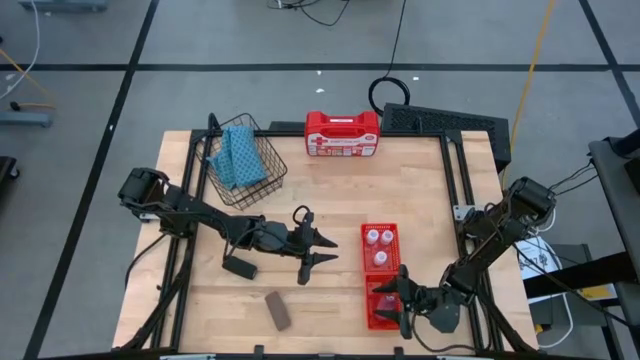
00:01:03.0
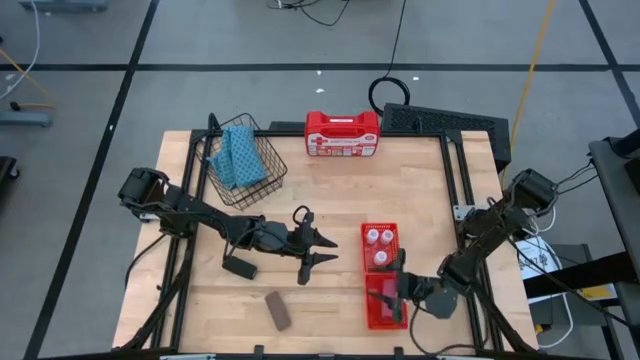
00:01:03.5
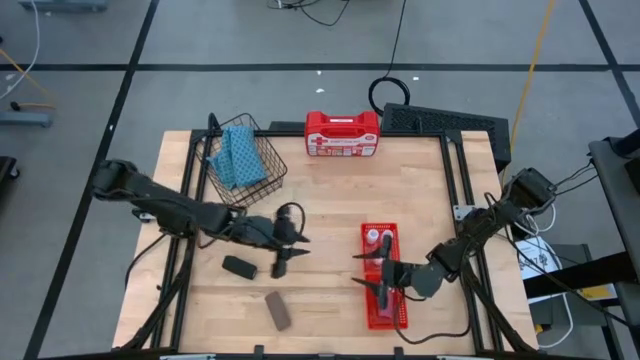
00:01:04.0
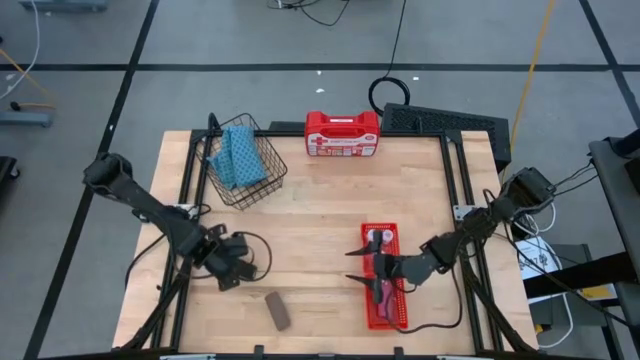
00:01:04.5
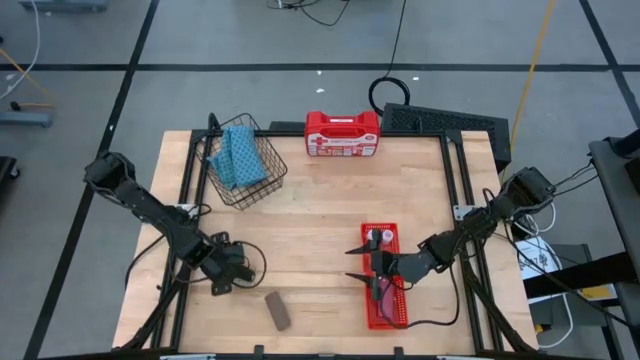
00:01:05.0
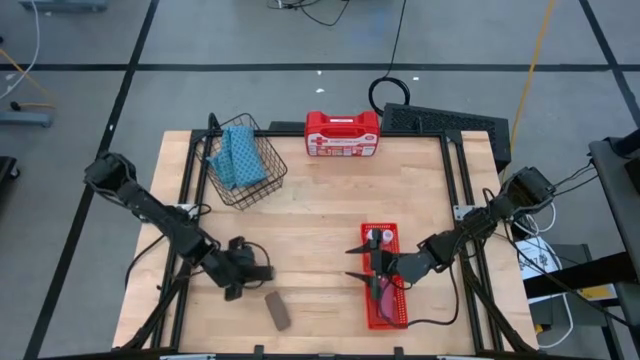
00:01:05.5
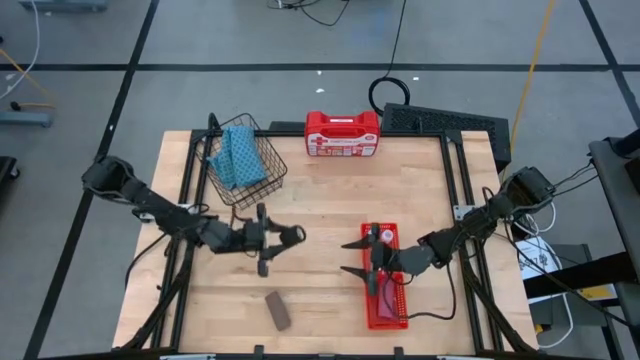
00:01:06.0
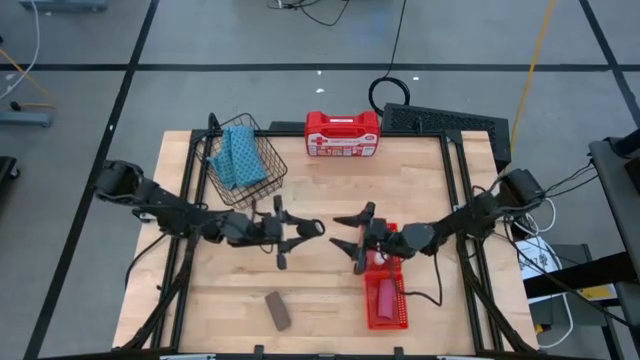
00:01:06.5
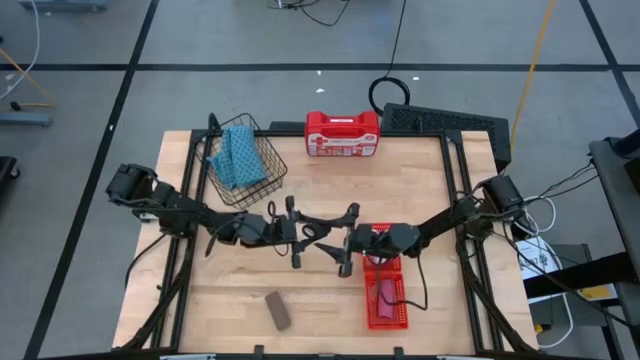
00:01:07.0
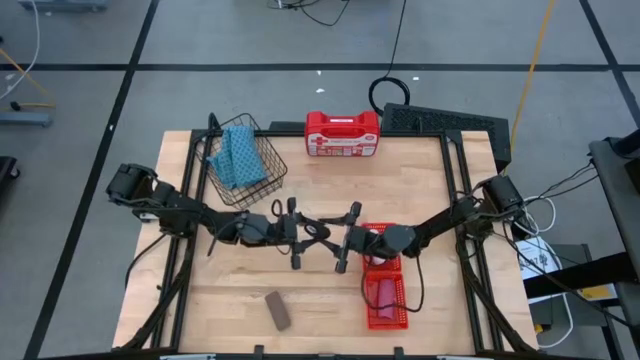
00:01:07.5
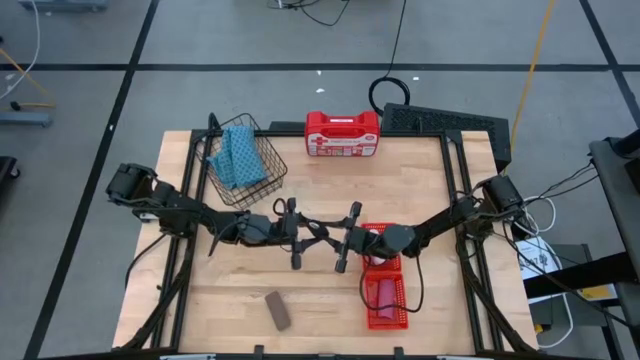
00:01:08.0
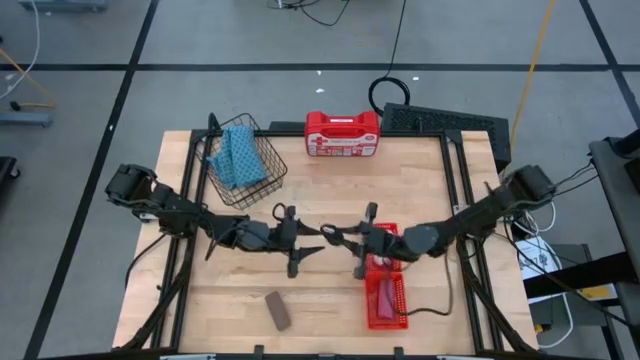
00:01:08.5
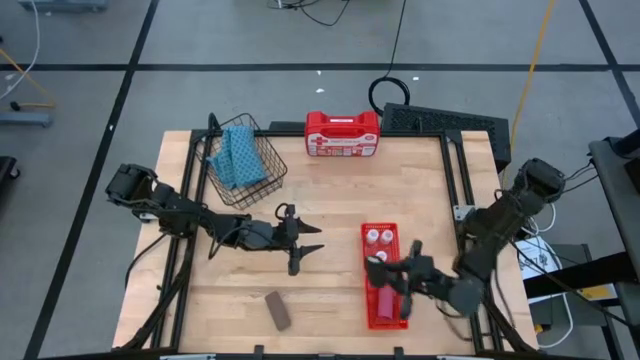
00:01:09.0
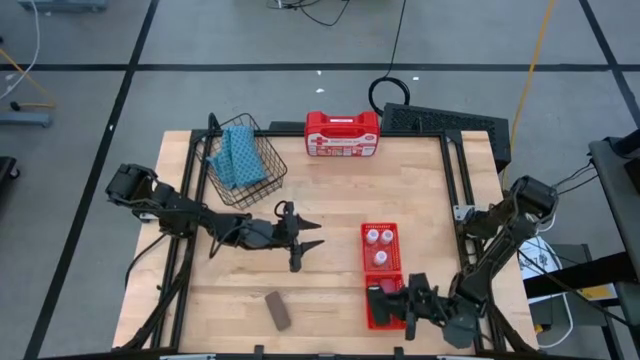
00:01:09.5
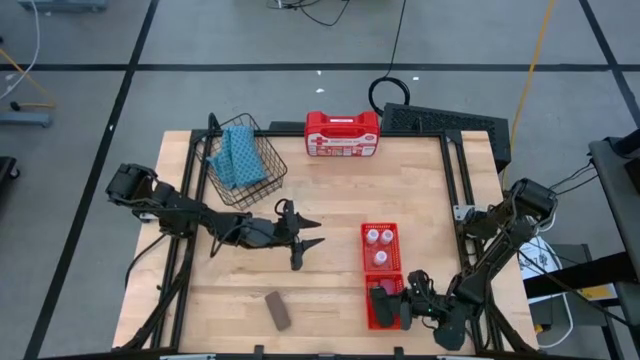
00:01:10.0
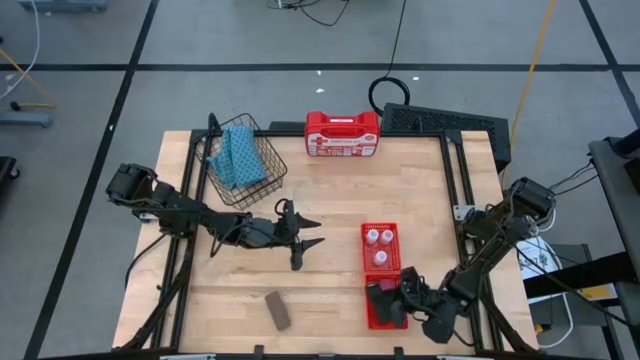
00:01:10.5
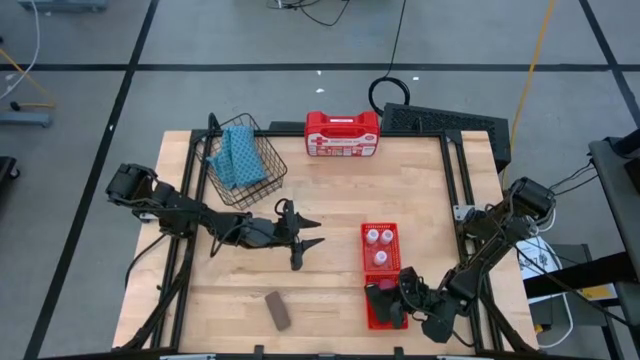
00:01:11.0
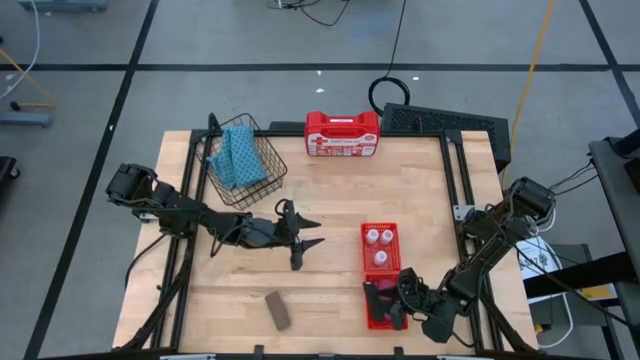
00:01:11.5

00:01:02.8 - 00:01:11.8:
Task: Pick & Place Medicine items
Put the black bandage into the bottom red basket

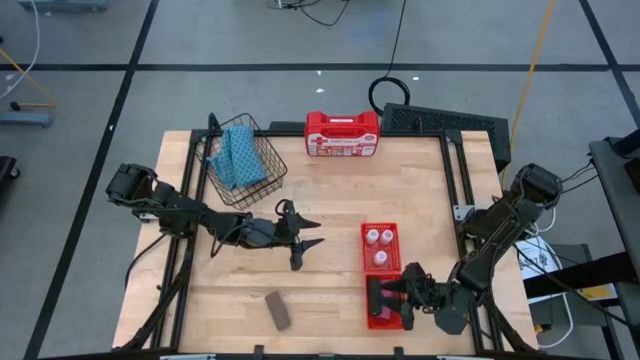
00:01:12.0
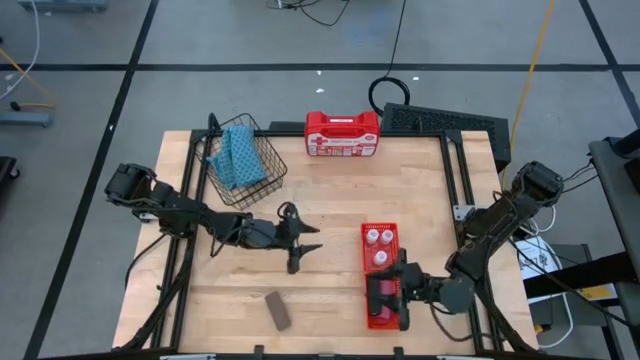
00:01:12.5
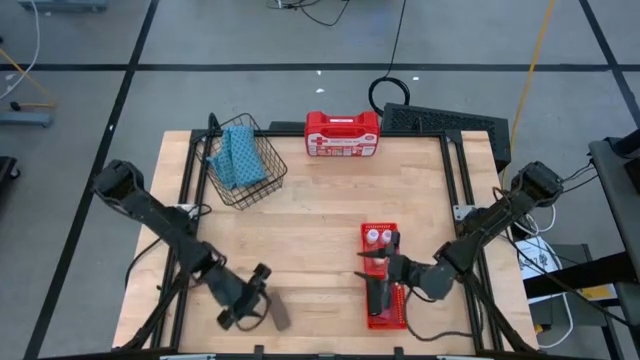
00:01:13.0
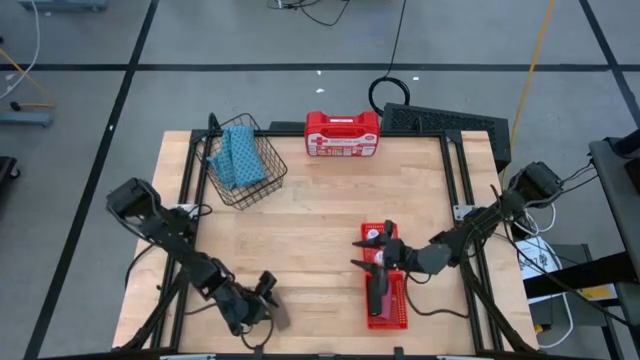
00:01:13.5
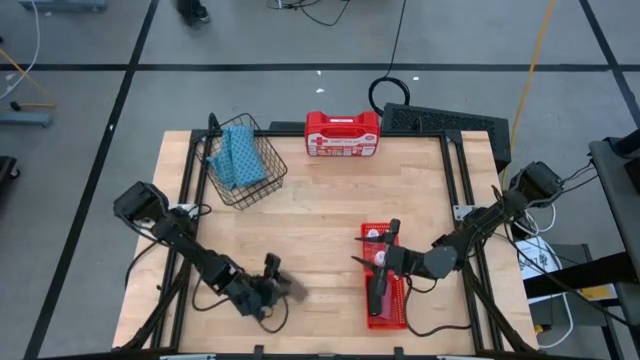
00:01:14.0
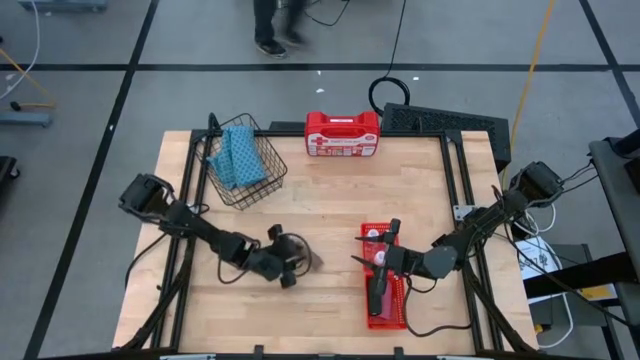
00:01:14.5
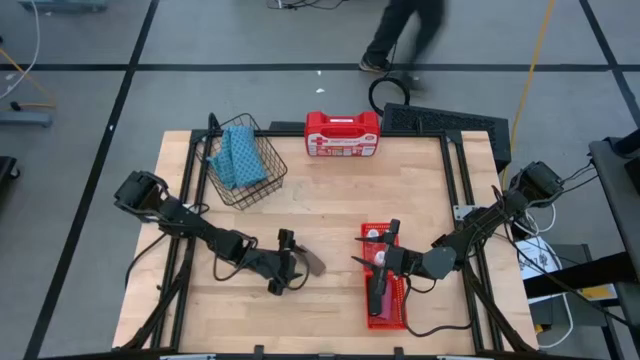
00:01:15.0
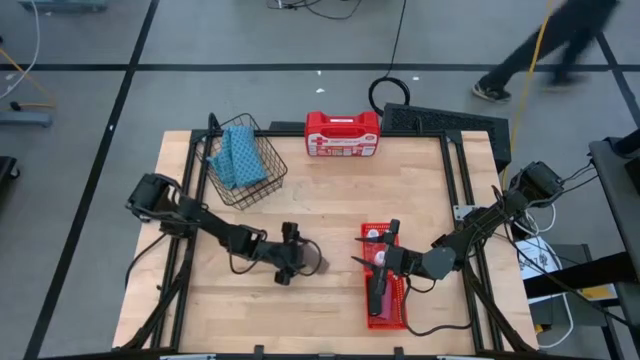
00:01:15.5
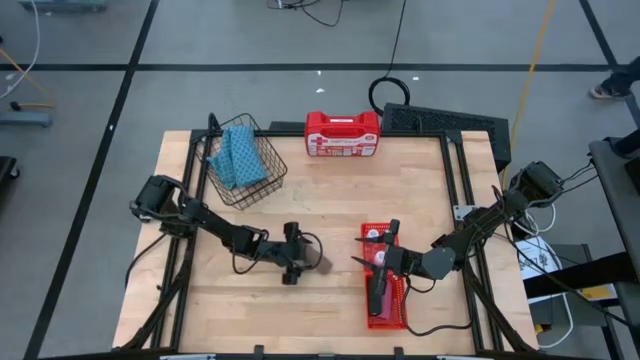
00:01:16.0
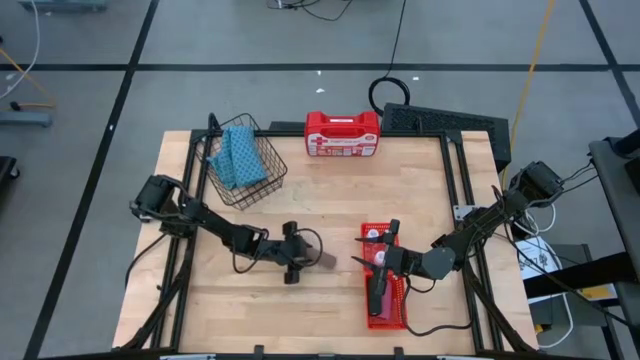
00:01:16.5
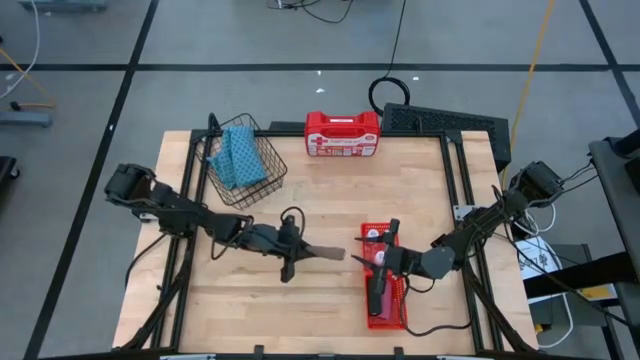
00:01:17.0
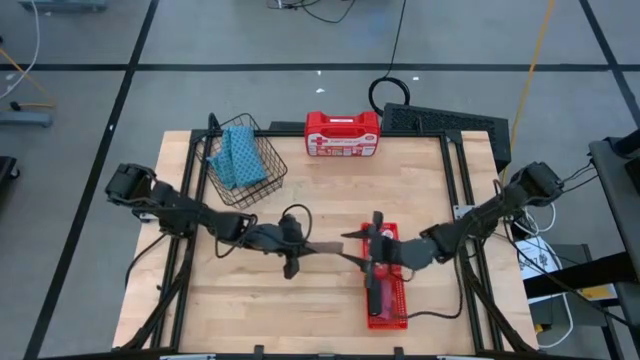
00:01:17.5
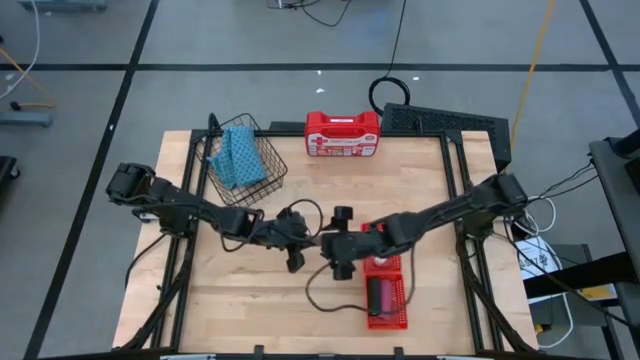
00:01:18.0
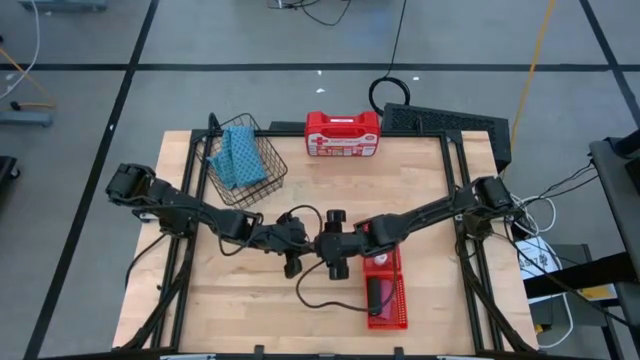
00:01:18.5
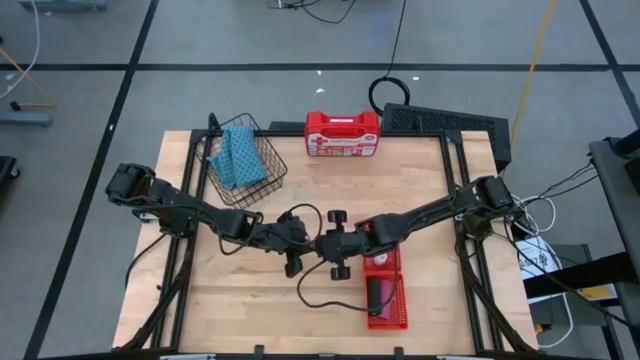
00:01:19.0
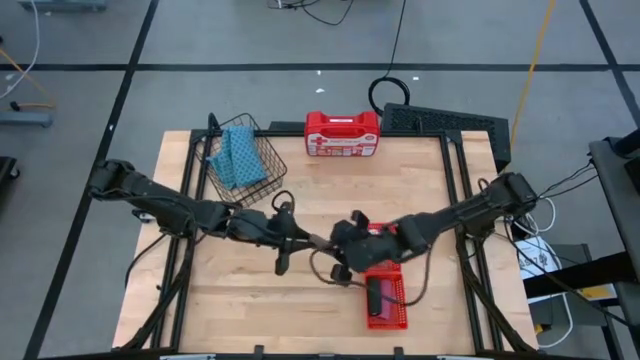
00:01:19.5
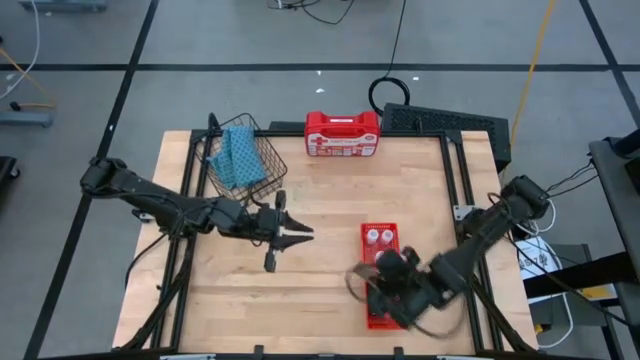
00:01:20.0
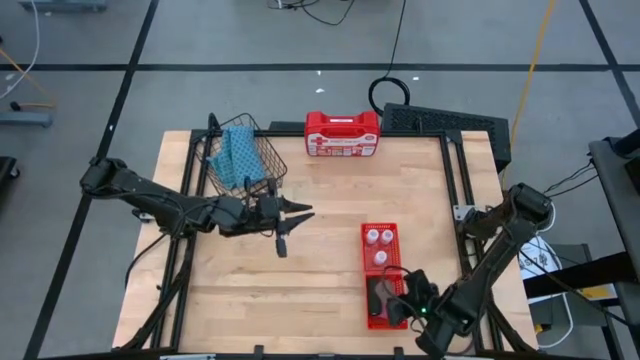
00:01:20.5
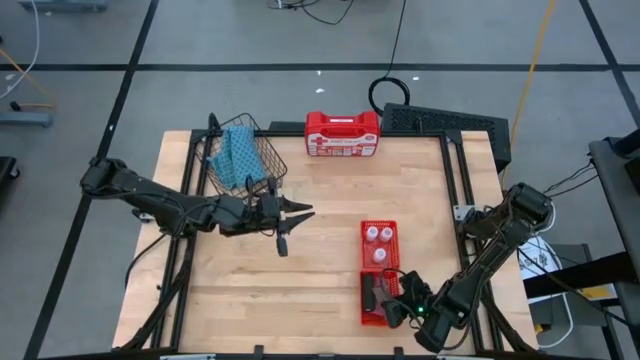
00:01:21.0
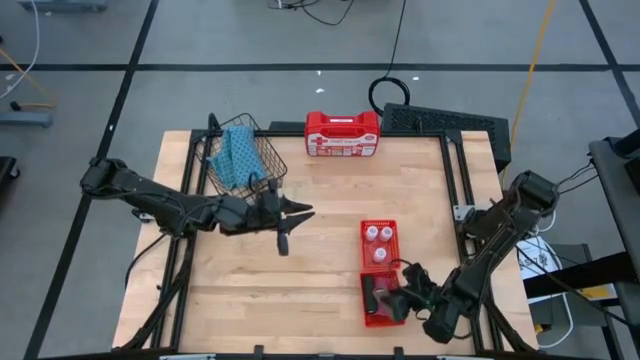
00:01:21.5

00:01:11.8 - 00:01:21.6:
Put the brown bandage into the bottom red basket

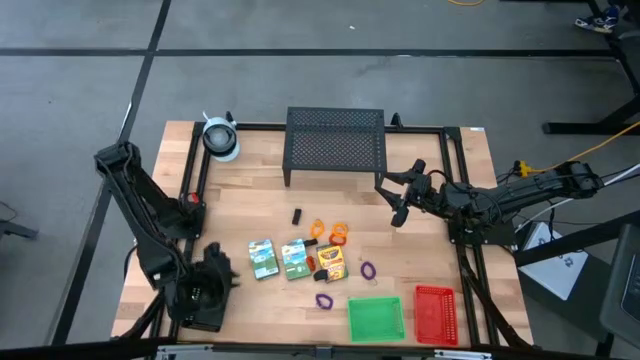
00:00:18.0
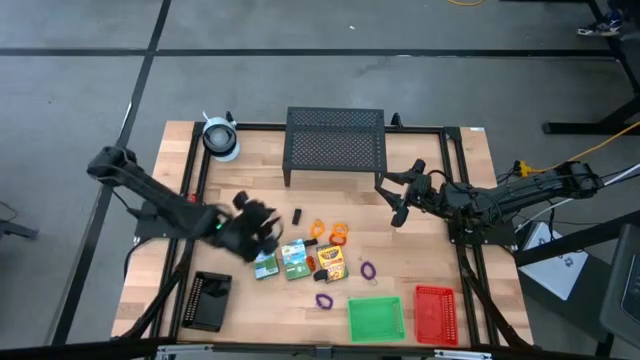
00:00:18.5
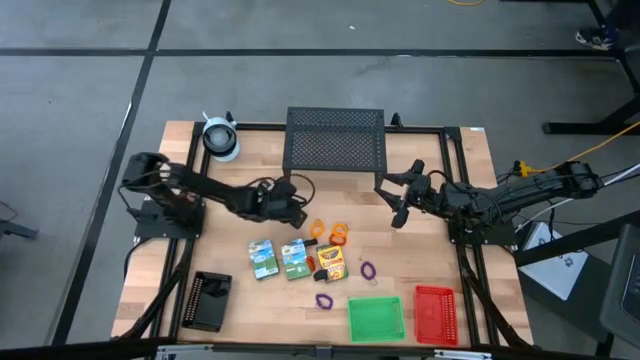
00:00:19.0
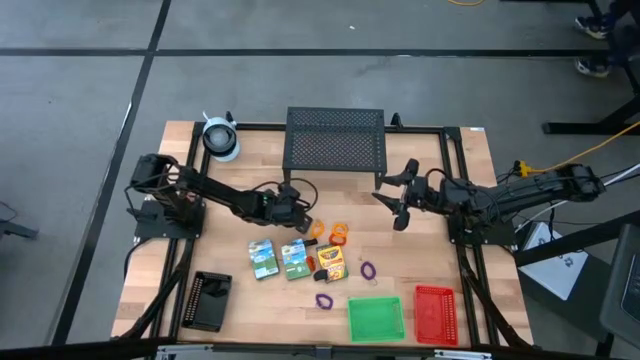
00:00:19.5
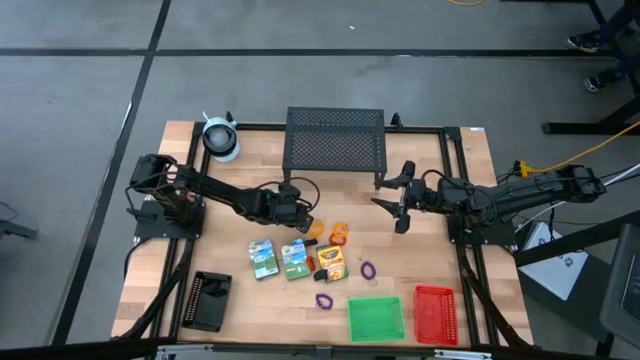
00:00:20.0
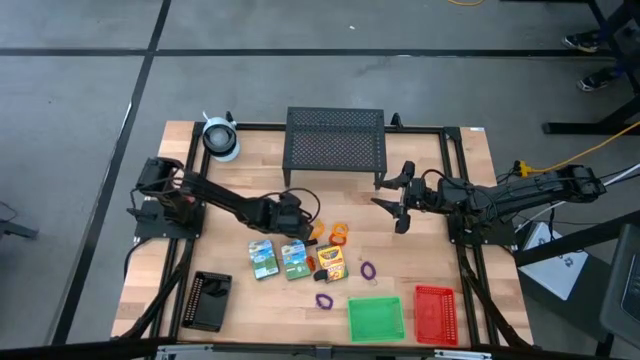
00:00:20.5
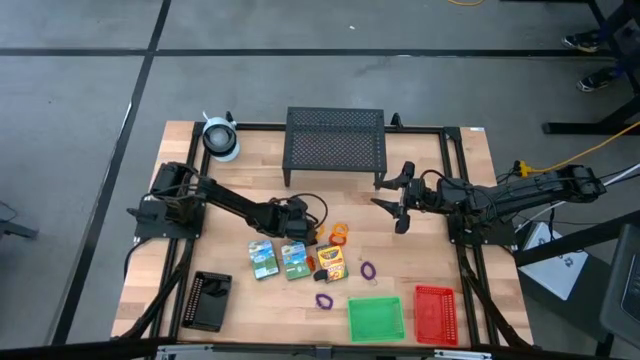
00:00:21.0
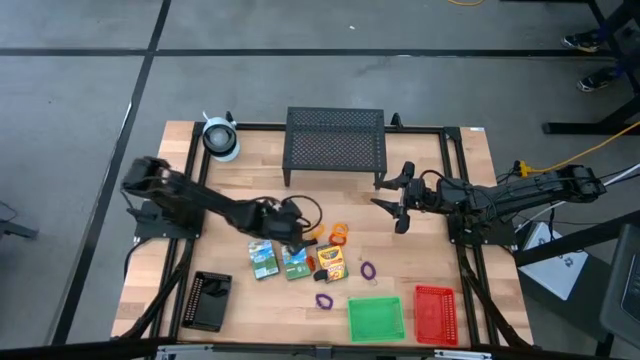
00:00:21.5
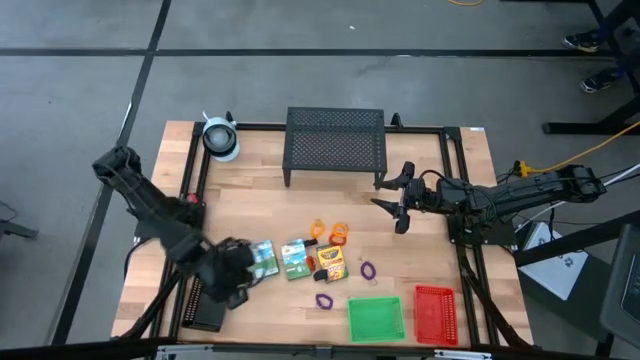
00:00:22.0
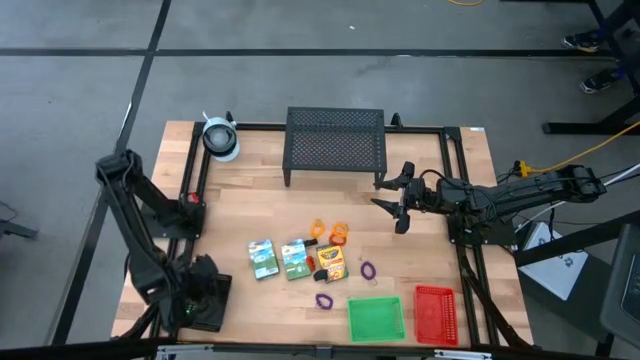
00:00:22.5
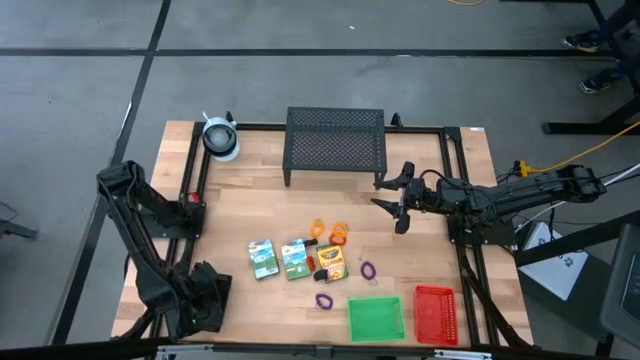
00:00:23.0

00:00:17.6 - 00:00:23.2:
Task: Pick & Place Office Desk Supplies
Put the black rubber band into the black bin
